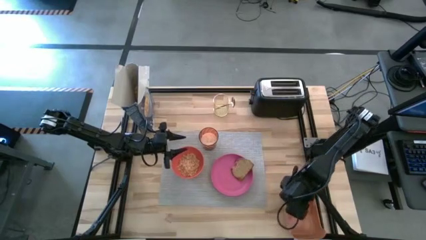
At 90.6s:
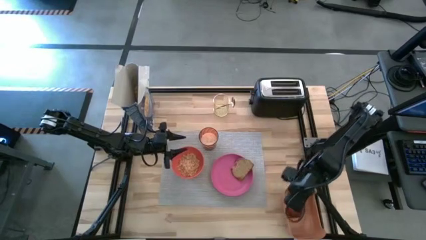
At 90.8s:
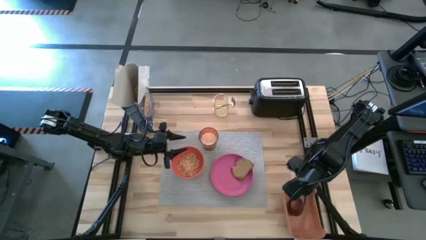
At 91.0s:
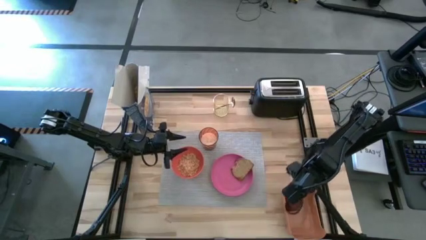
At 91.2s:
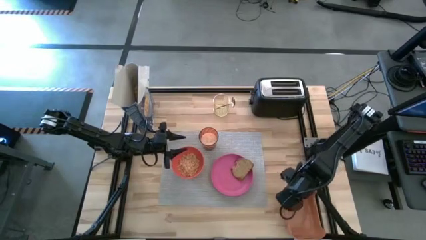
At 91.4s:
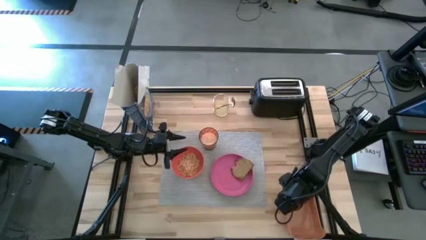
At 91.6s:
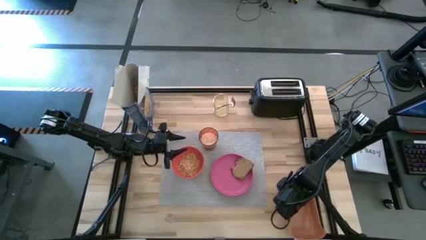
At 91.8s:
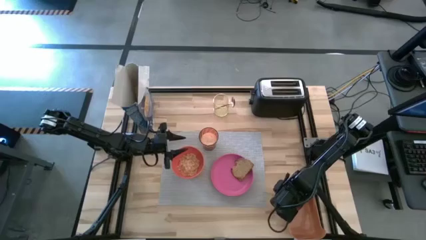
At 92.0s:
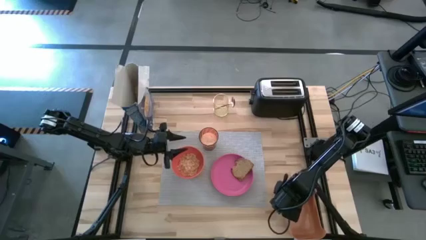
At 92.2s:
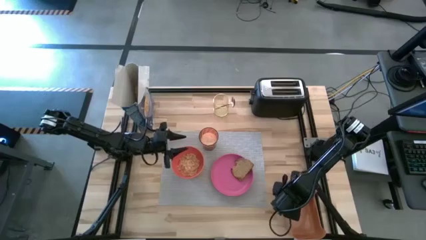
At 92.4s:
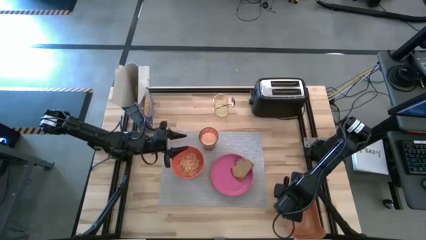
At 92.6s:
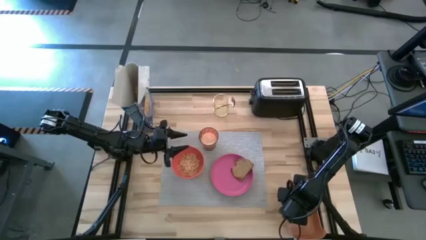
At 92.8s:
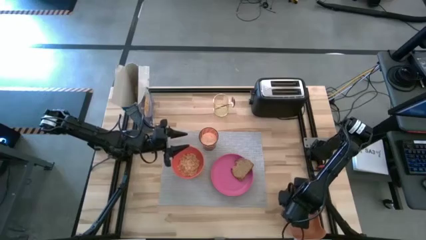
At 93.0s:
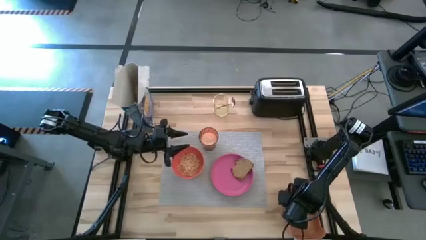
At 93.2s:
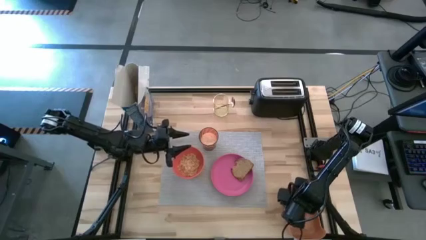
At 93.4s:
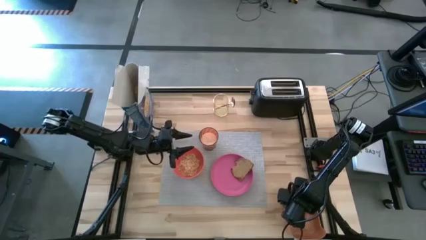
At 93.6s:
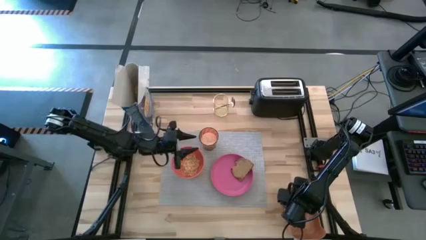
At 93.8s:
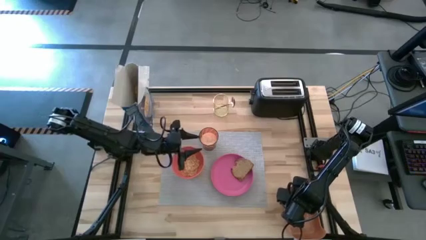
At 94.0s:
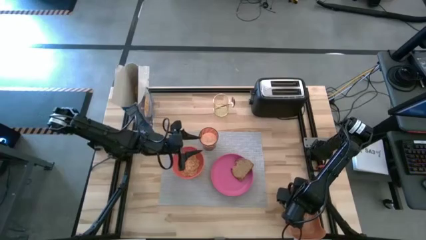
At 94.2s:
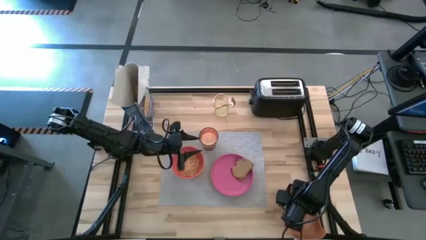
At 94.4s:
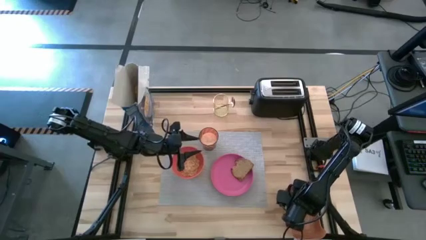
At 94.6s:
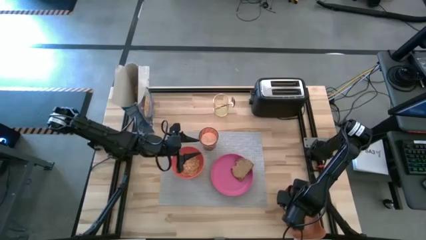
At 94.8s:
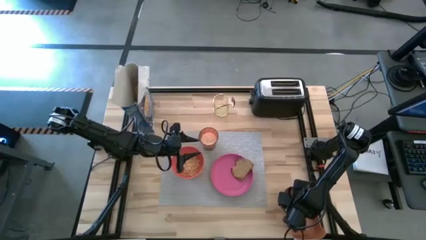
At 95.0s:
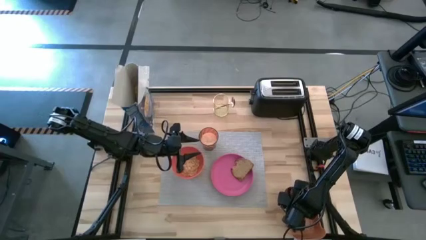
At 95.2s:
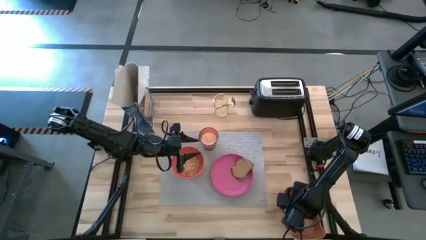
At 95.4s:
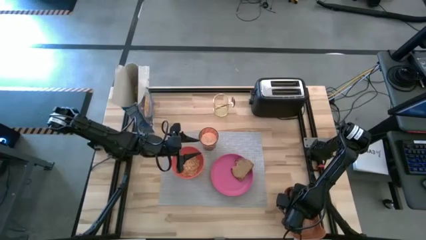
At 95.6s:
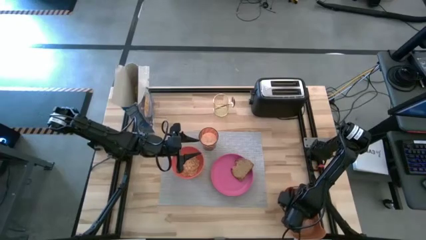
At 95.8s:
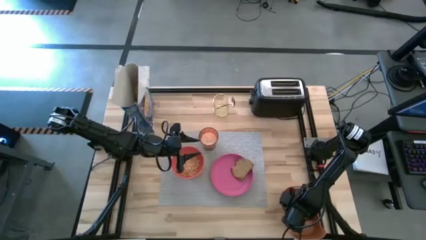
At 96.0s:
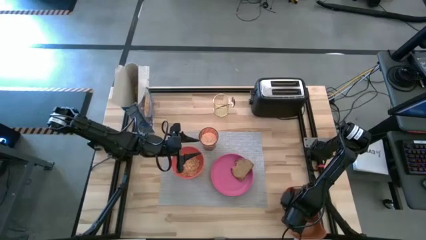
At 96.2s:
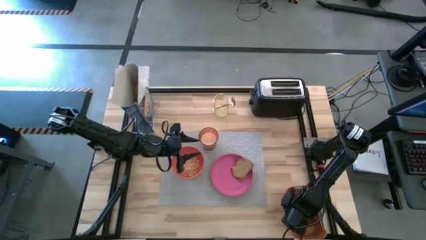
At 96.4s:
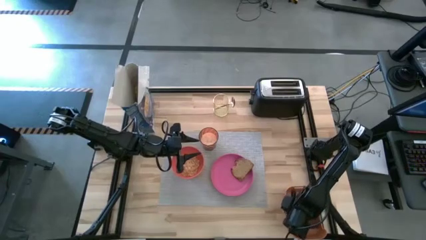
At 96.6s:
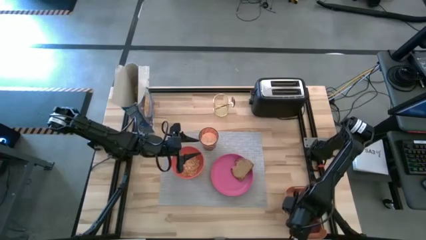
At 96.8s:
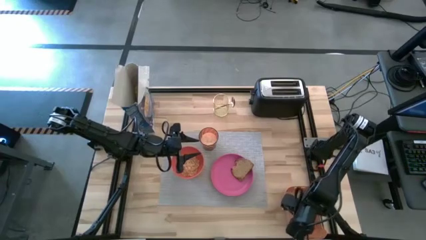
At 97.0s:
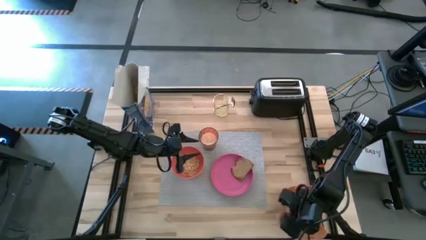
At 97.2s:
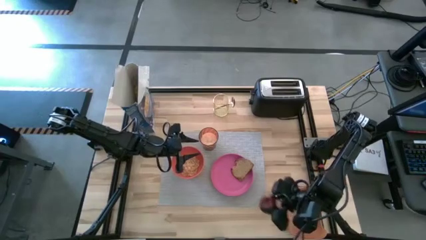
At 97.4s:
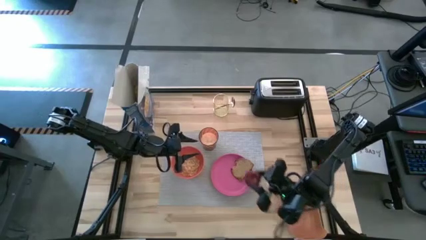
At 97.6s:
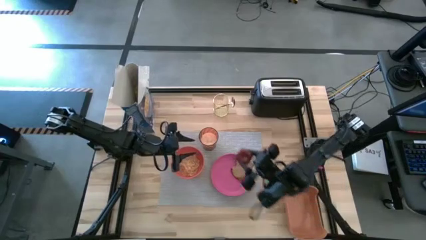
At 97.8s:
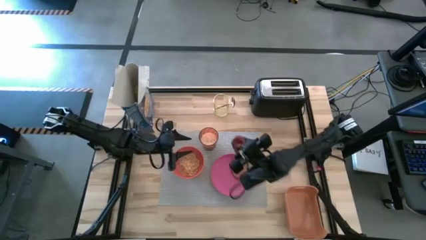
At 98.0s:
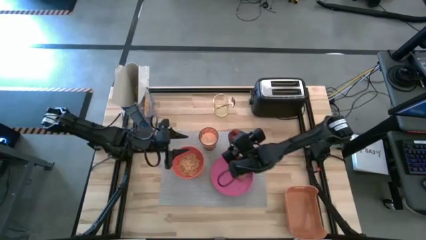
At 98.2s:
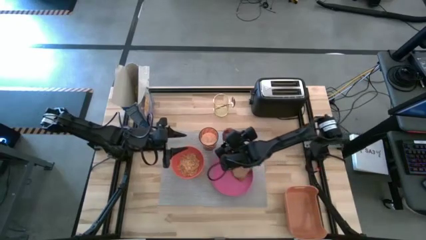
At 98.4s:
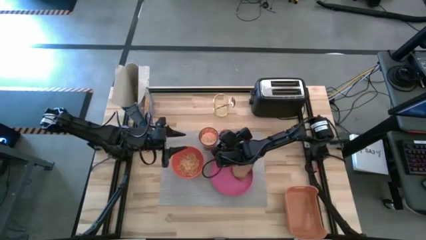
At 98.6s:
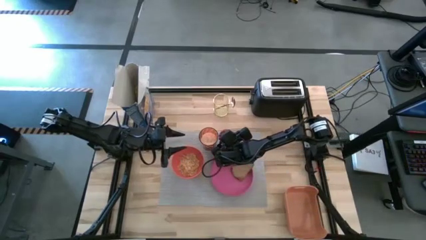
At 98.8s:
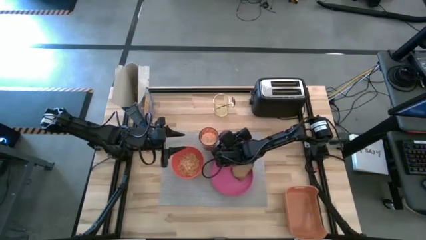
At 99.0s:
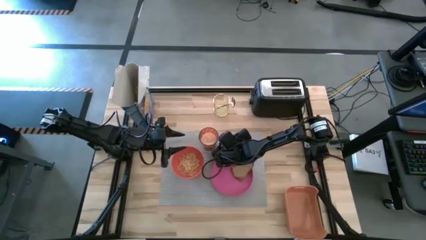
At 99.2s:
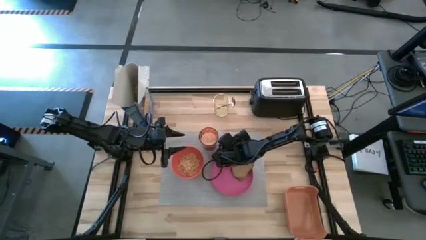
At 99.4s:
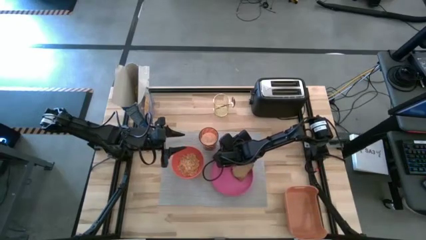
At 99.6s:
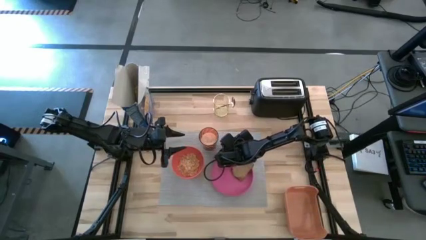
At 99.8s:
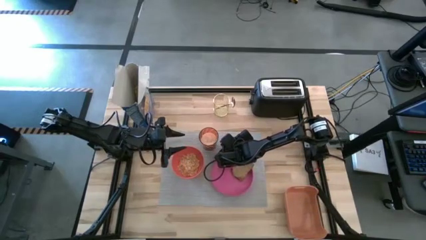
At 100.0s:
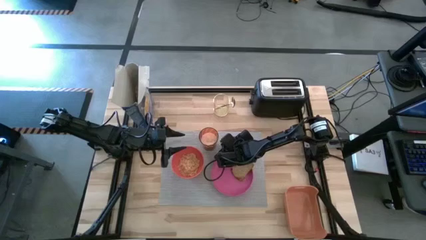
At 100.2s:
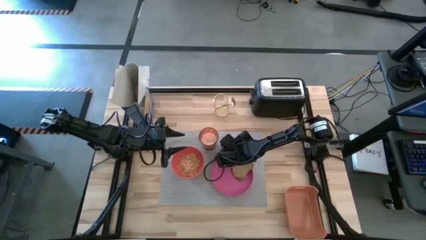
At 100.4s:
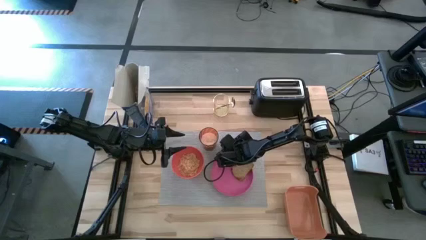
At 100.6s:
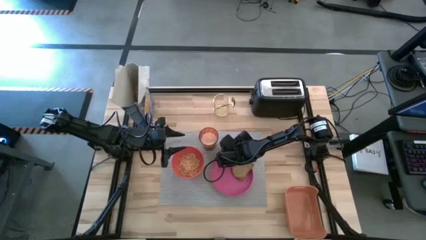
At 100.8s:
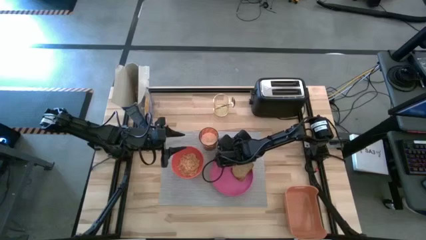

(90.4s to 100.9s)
Task: Arrange a breakfast setting
Put the red apple from the orange bin on the gray placemat
